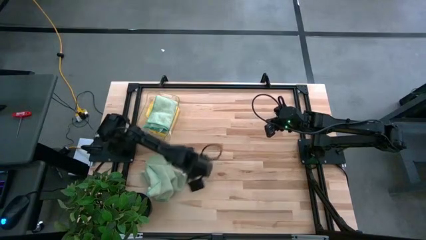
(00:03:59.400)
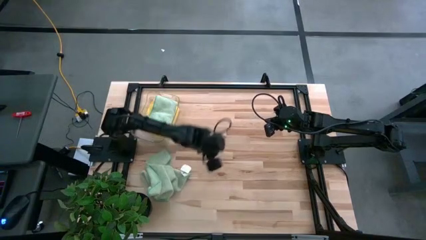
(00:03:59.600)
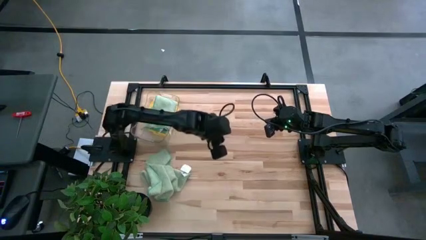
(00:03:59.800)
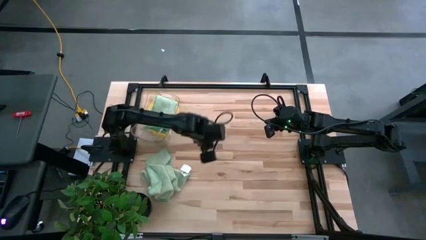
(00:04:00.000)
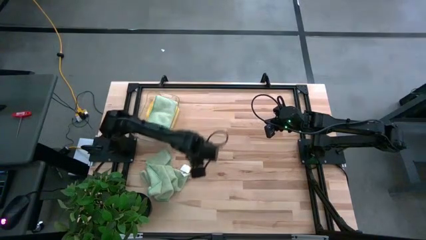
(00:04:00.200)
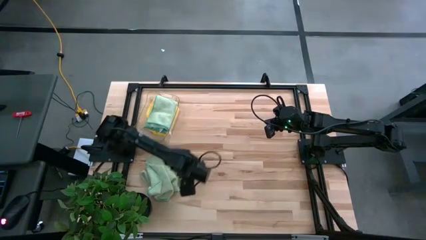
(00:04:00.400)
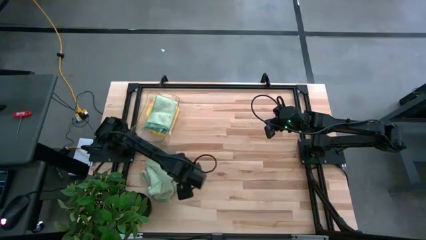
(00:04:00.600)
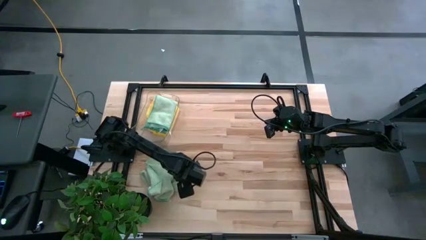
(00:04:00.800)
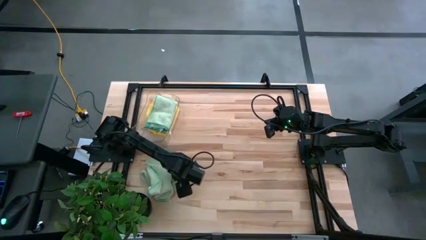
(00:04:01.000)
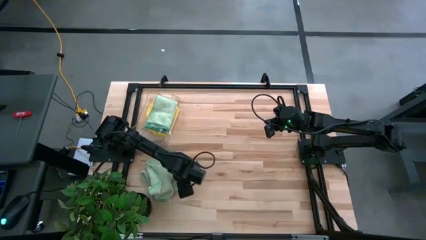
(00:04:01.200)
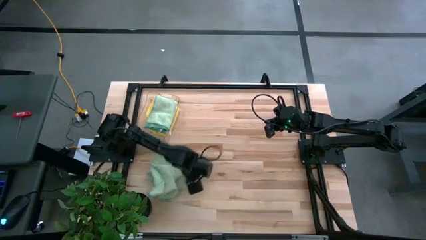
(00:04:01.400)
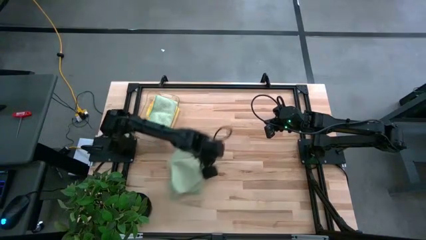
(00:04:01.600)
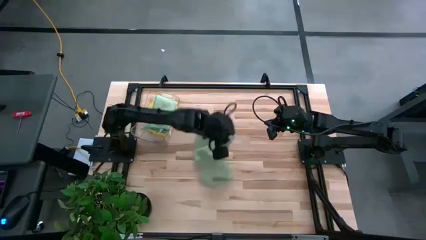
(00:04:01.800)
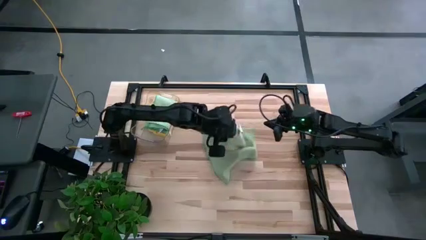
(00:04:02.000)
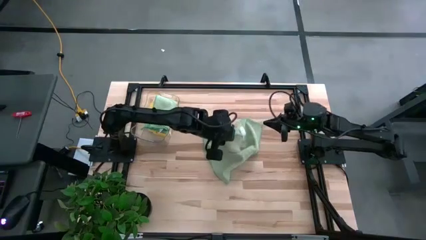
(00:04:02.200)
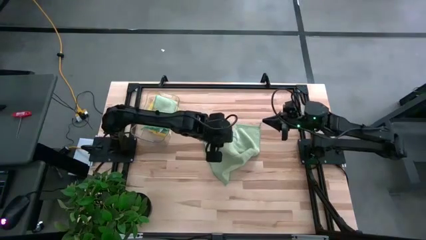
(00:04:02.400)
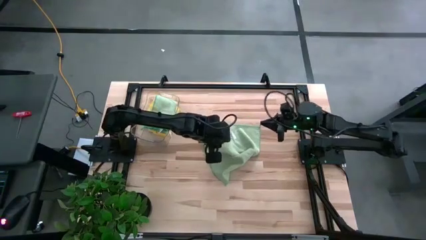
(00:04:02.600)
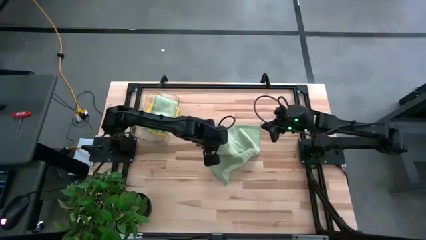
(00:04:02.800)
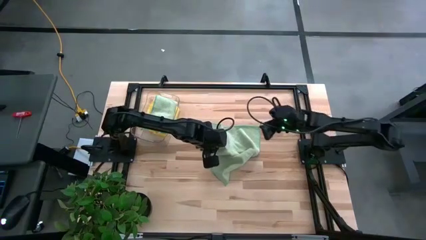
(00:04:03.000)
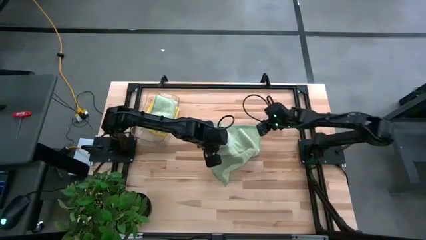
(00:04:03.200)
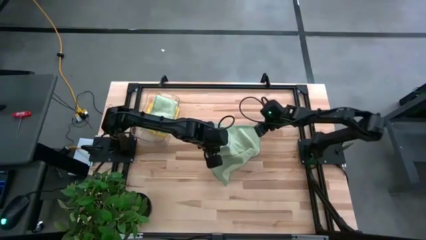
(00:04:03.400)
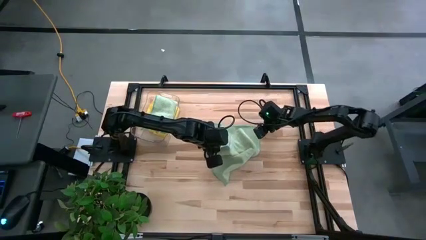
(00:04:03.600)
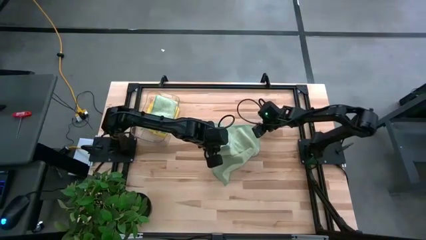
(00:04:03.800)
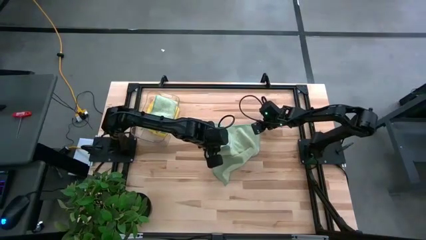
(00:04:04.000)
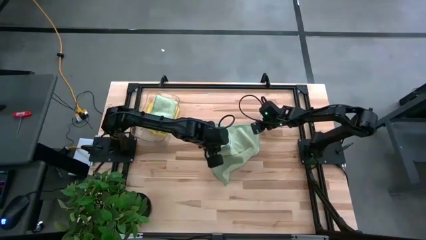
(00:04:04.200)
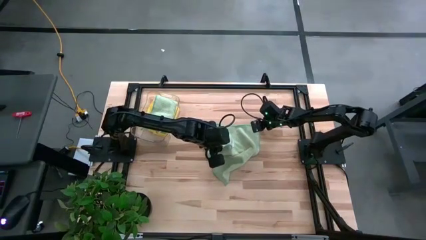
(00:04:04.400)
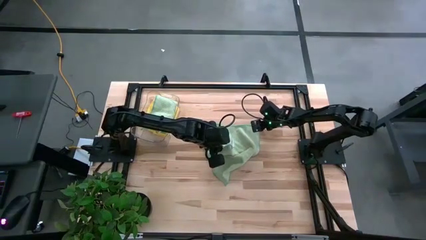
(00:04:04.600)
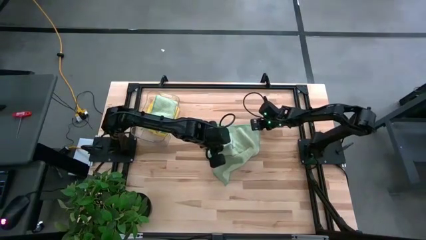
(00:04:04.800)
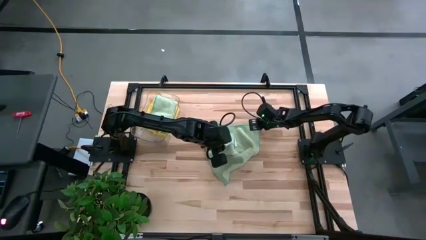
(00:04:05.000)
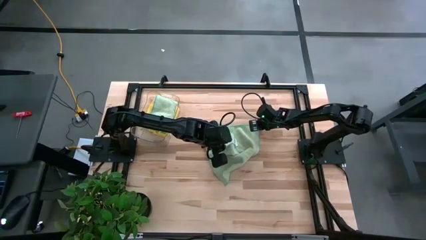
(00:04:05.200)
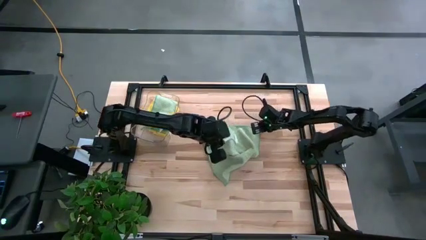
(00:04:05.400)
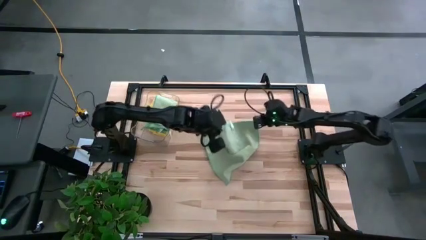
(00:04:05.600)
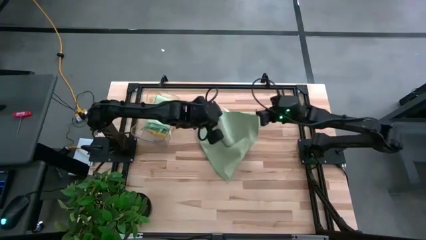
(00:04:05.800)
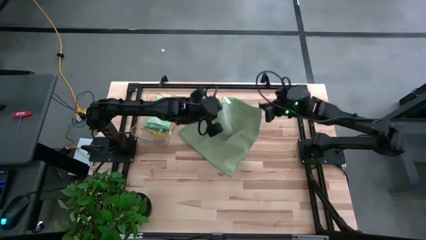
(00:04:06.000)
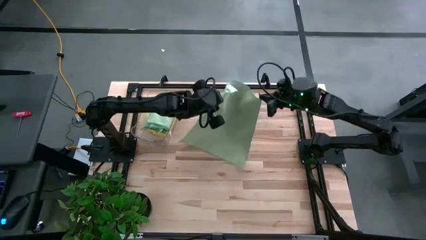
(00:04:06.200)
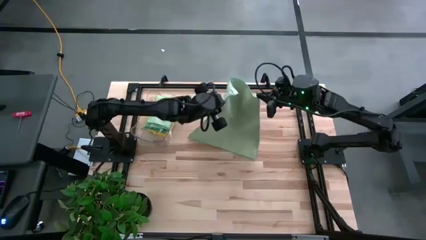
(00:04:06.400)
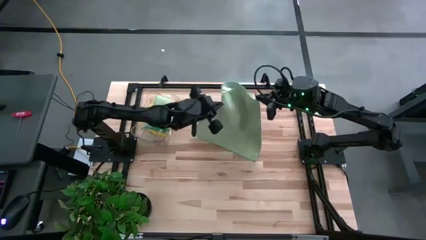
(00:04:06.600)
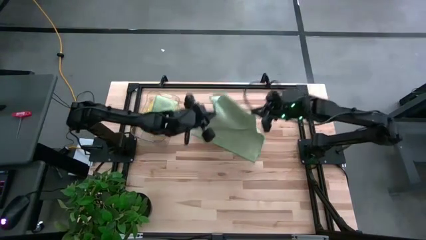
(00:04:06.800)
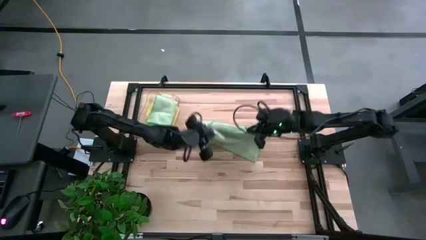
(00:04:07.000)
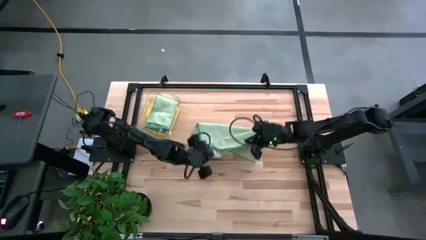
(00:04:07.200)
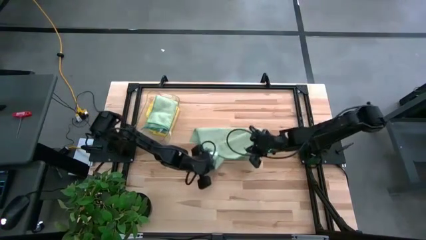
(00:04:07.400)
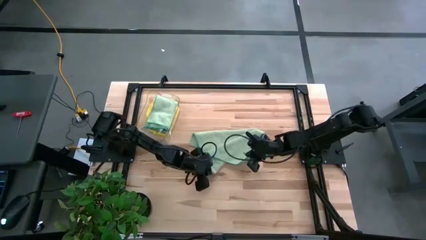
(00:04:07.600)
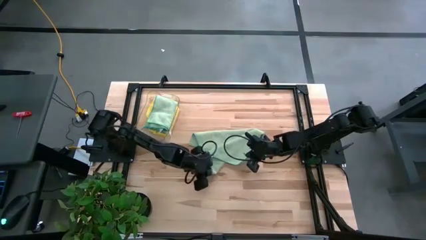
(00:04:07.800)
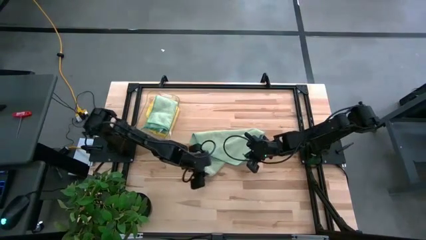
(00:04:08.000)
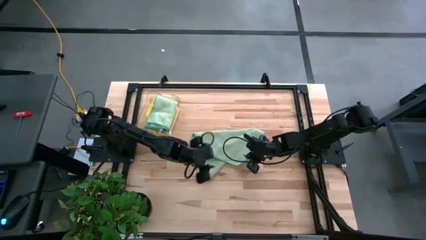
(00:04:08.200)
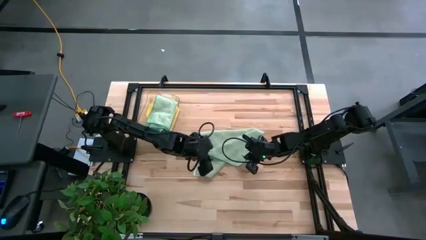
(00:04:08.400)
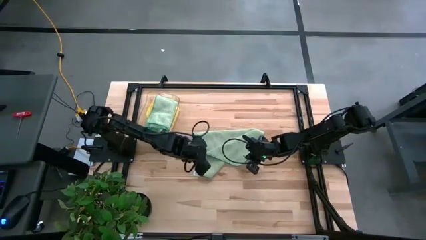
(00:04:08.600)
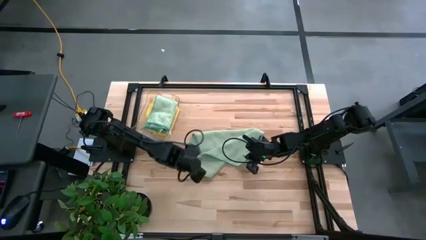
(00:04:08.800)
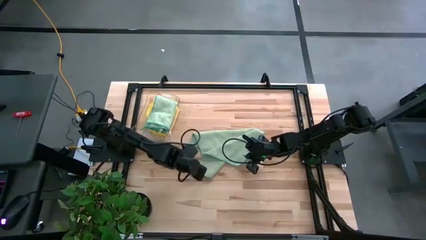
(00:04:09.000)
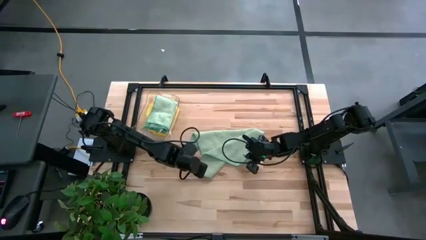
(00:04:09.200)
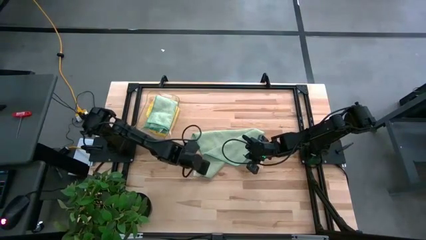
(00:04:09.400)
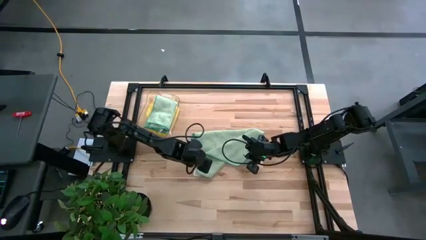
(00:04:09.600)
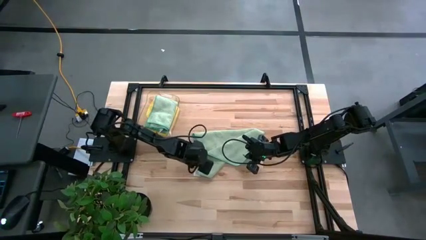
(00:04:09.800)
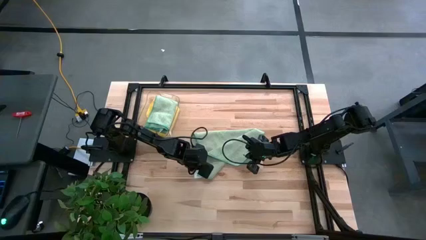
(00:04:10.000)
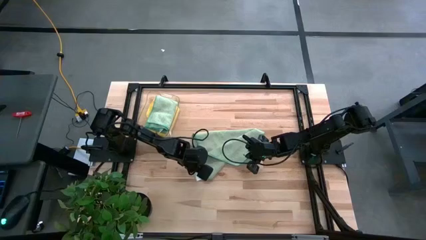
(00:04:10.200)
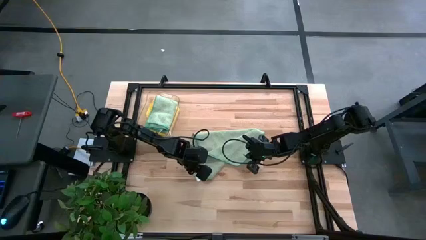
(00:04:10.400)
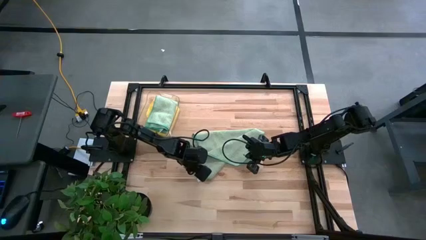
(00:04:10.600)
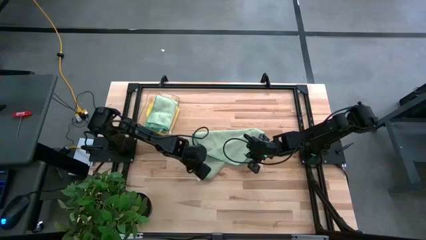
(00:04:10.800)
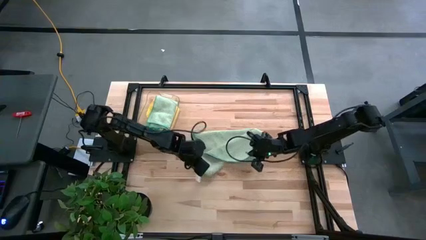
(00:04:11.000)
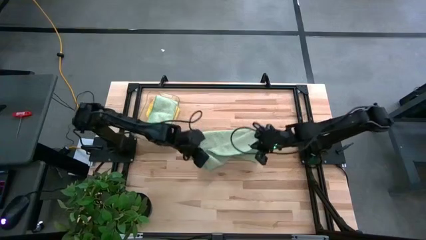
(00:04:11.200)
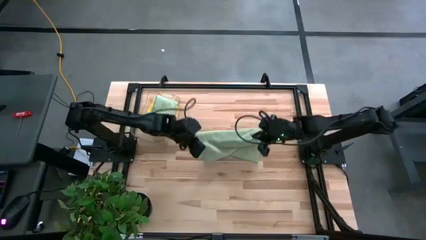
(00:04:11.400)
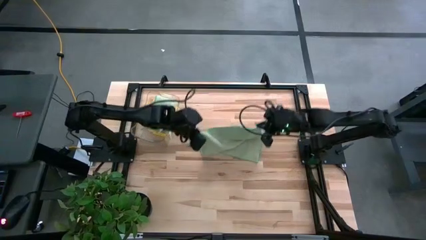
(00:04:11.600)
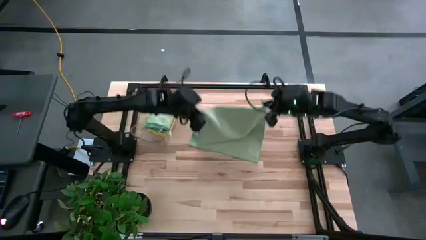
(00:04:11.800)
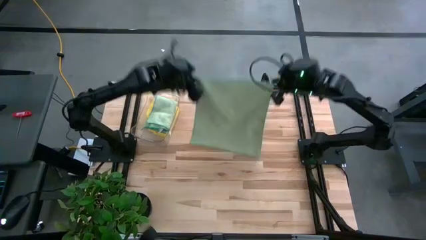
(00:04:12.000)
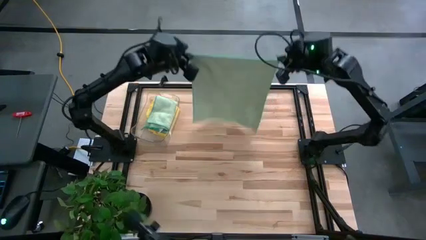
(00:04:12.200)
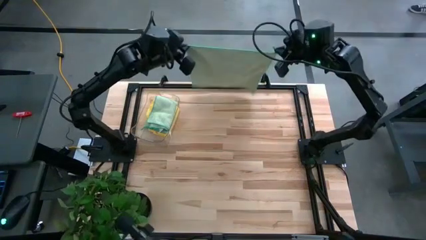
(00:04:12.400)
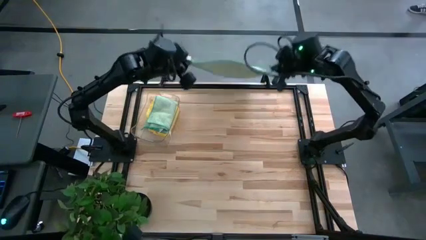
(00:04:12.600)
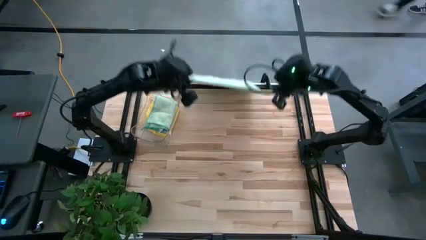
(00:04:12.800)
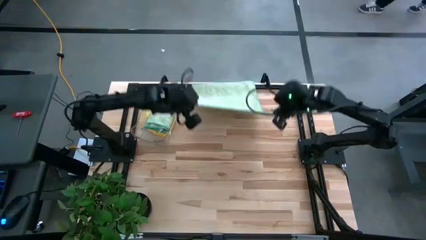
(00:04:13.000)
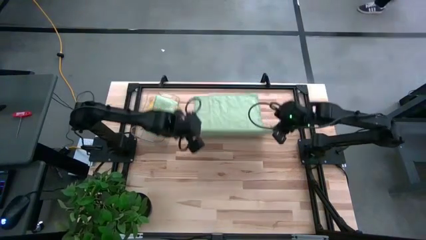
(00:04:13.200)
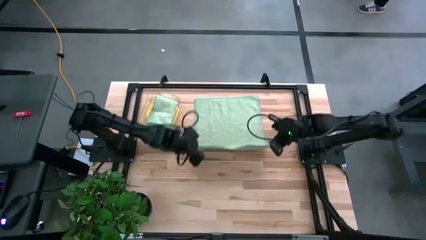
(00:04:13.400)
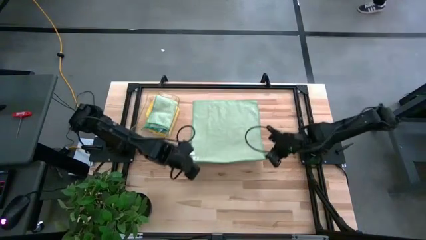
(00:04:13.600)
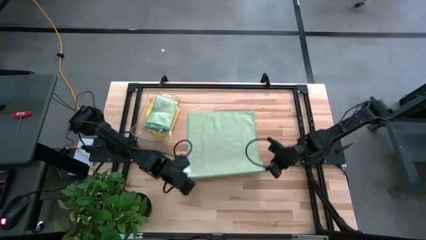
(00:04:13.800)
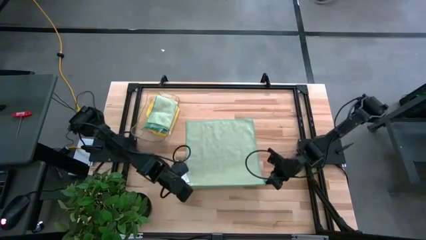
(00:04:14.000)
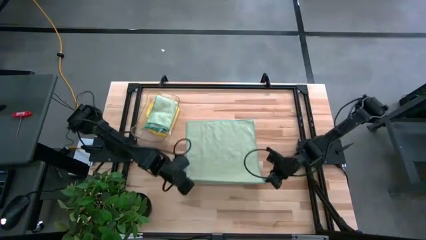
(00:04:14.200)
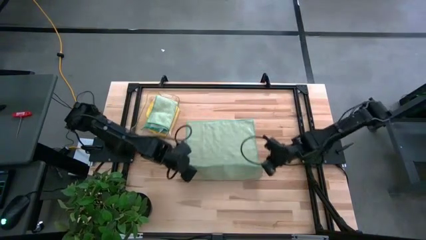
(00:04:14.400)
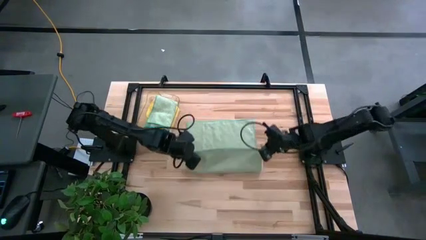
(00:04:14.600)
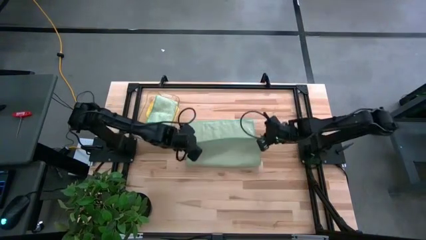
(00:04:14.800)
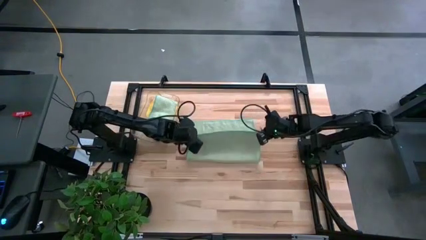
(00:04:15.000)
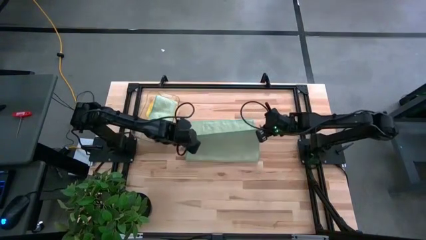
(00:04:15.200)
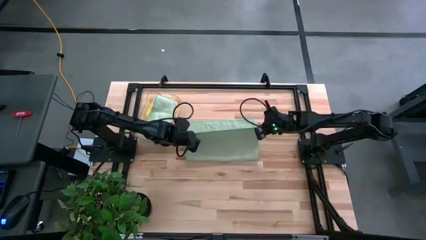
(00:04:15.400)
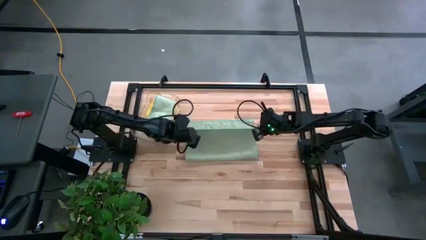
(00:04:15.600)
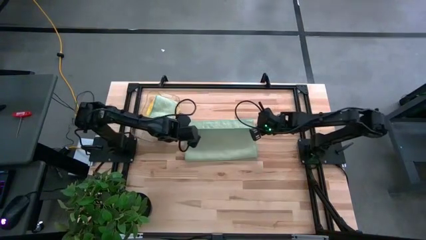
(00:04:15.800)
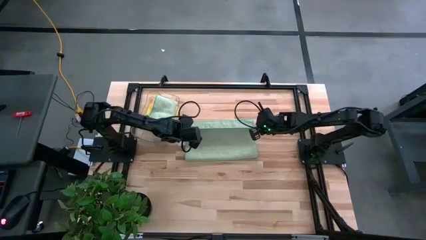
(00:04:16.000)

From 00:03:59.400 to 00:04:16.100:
Task: Fold microfiber towels
Fold the green towel
